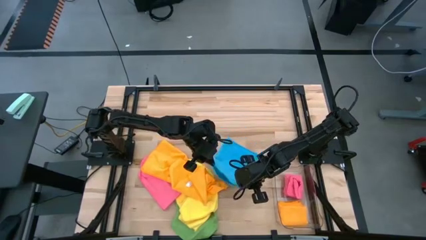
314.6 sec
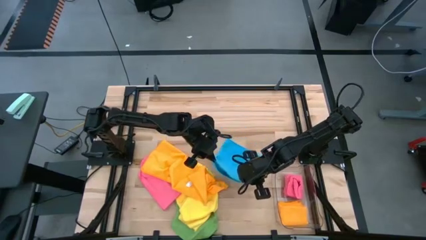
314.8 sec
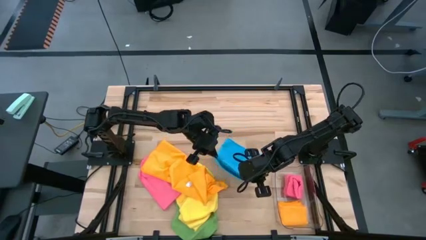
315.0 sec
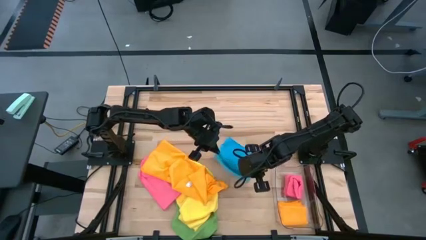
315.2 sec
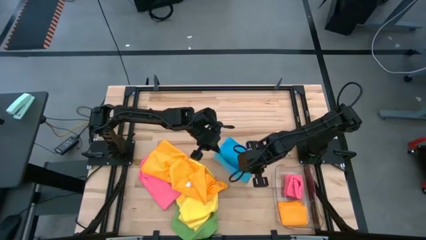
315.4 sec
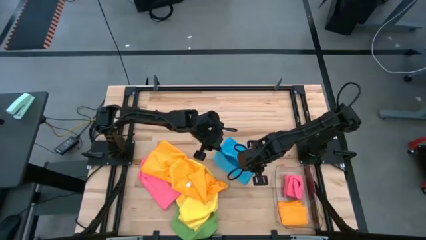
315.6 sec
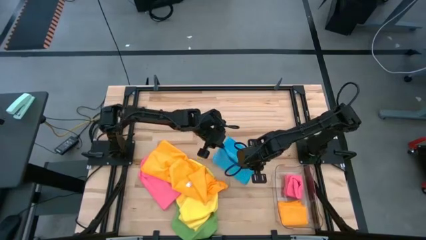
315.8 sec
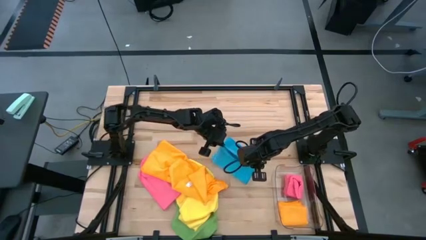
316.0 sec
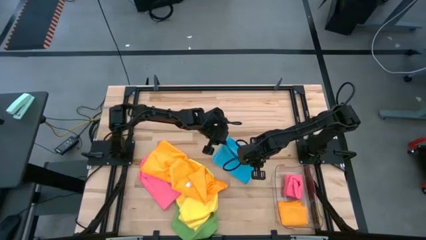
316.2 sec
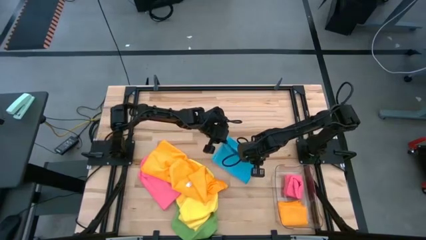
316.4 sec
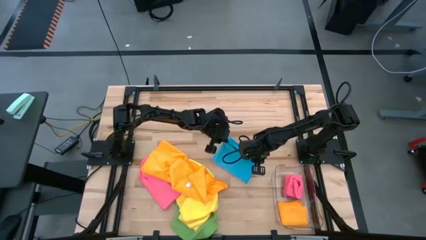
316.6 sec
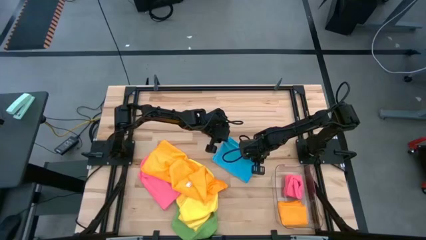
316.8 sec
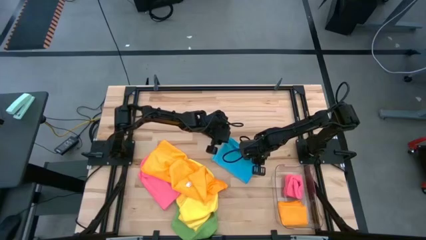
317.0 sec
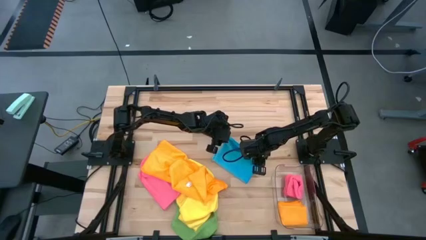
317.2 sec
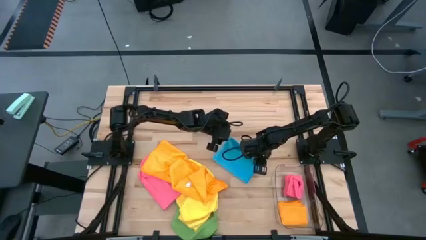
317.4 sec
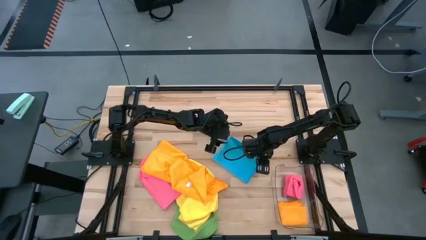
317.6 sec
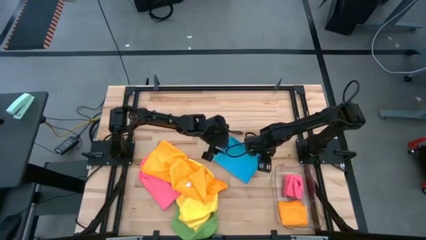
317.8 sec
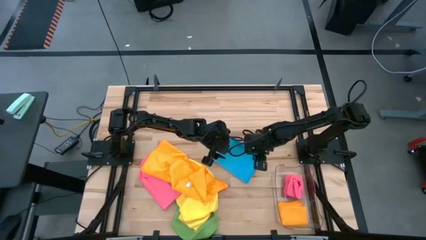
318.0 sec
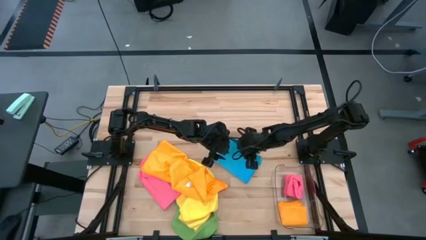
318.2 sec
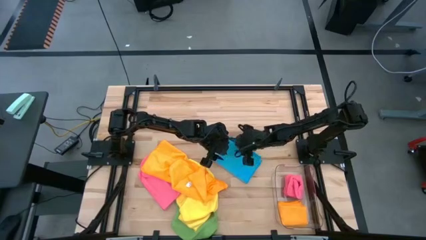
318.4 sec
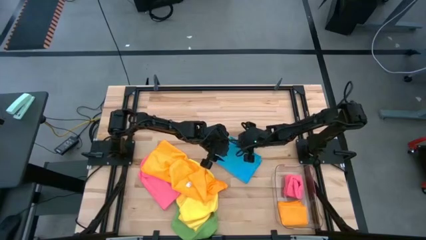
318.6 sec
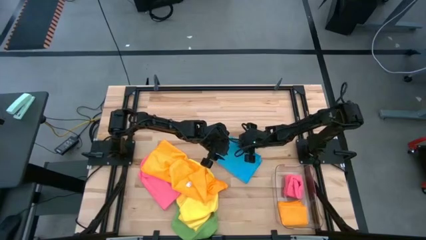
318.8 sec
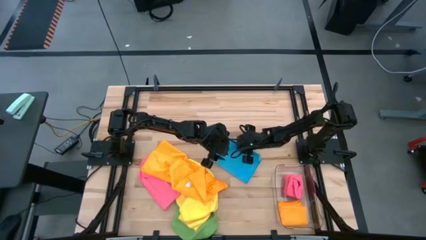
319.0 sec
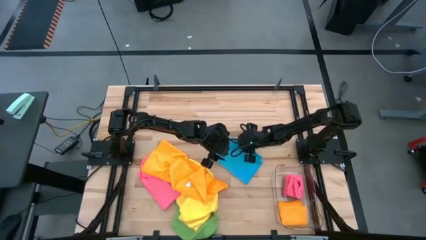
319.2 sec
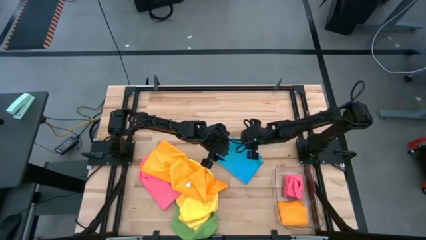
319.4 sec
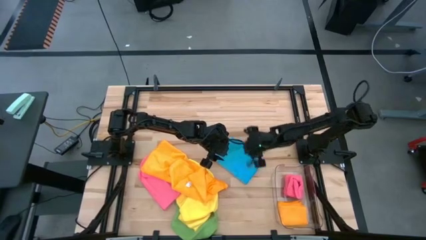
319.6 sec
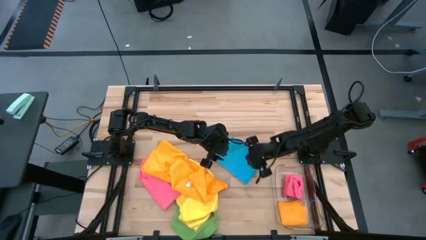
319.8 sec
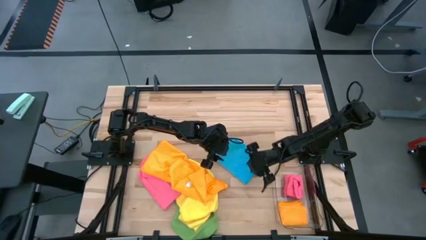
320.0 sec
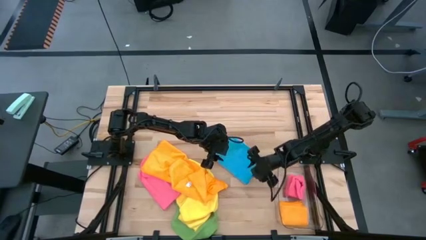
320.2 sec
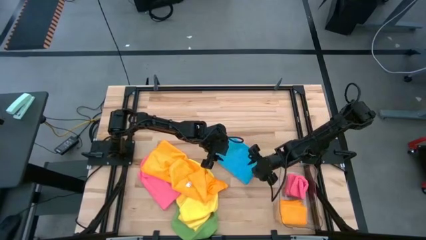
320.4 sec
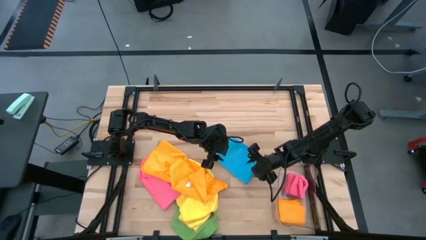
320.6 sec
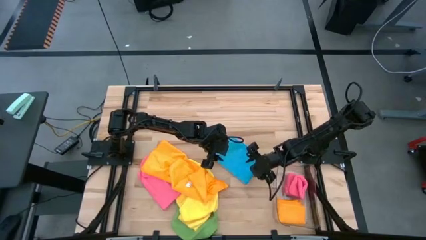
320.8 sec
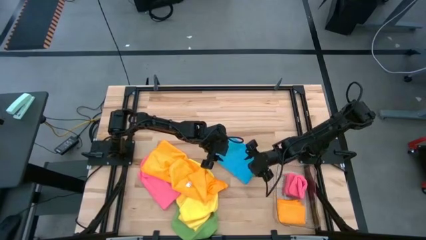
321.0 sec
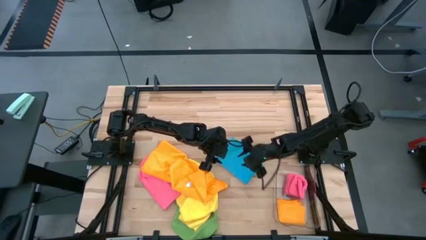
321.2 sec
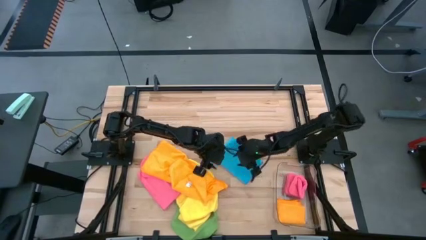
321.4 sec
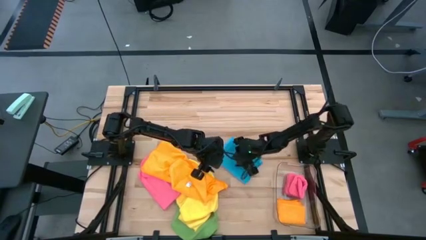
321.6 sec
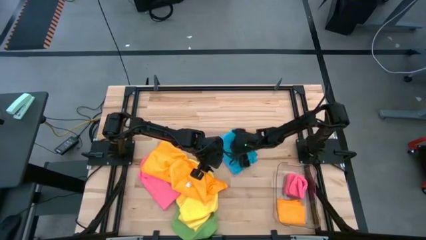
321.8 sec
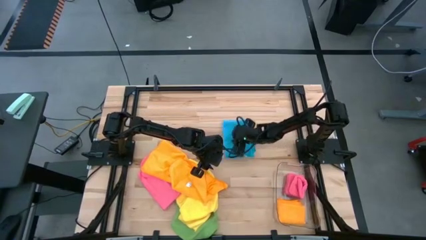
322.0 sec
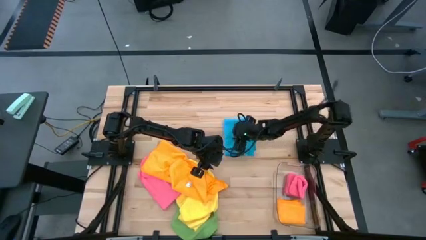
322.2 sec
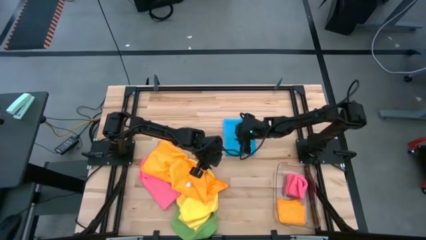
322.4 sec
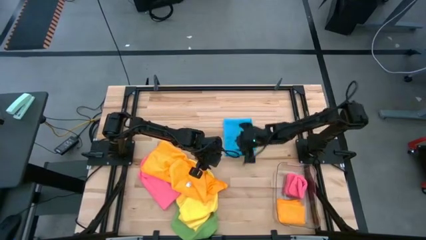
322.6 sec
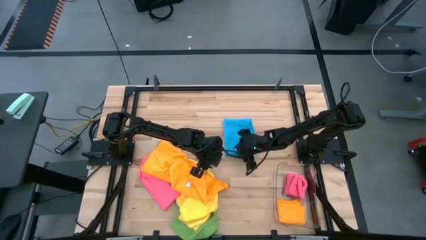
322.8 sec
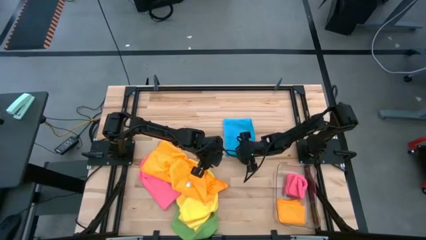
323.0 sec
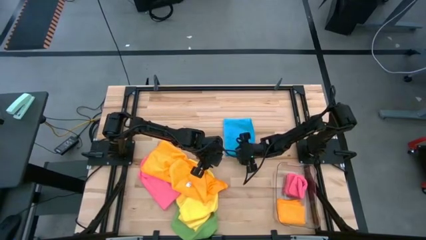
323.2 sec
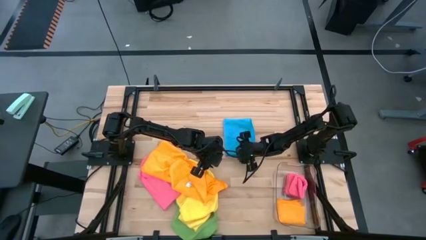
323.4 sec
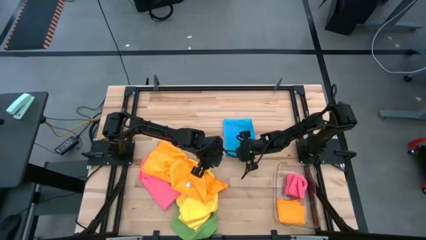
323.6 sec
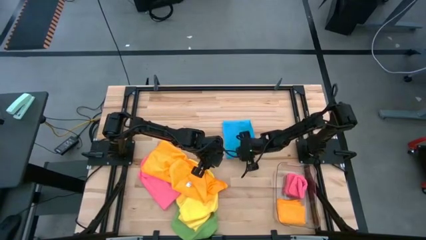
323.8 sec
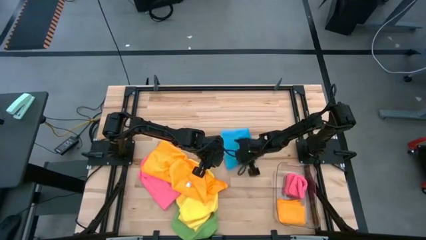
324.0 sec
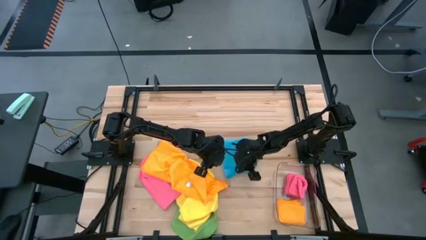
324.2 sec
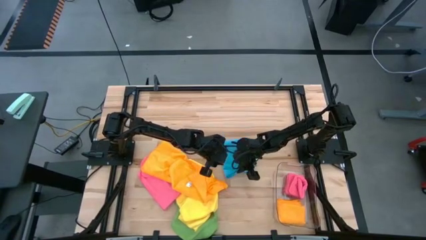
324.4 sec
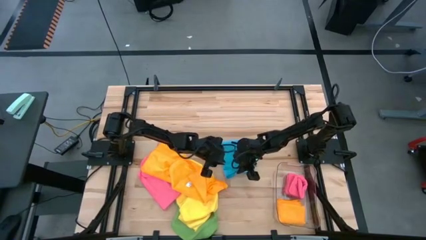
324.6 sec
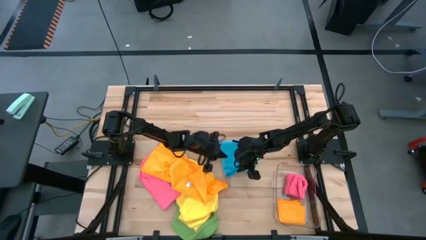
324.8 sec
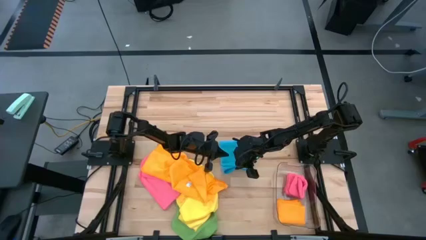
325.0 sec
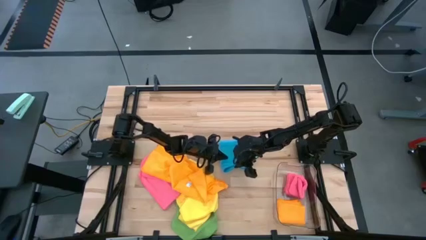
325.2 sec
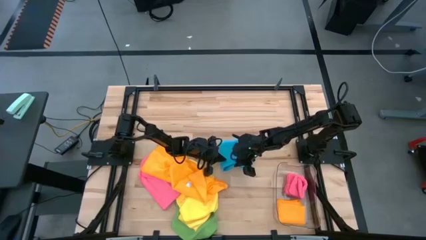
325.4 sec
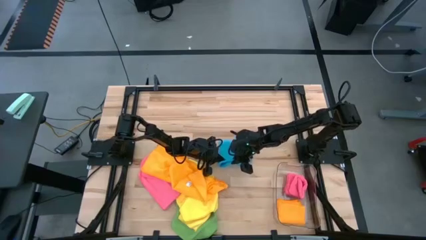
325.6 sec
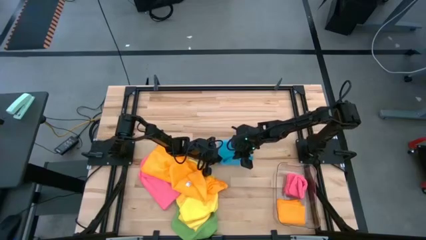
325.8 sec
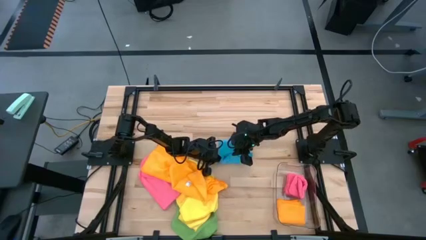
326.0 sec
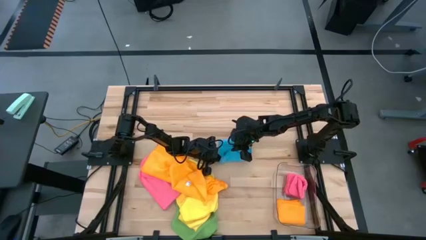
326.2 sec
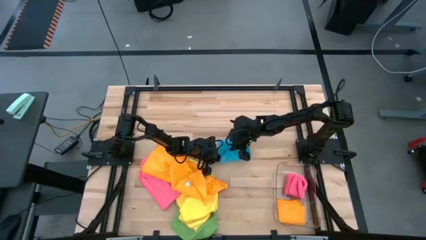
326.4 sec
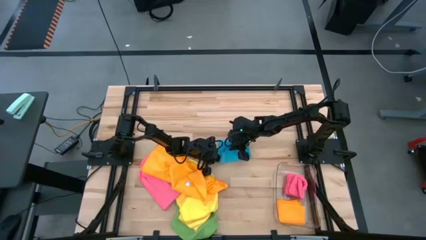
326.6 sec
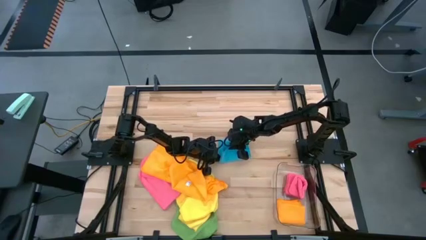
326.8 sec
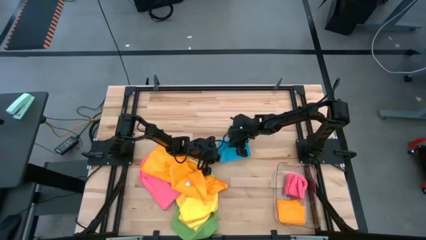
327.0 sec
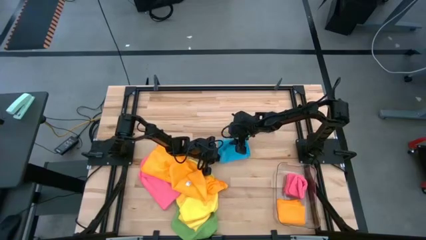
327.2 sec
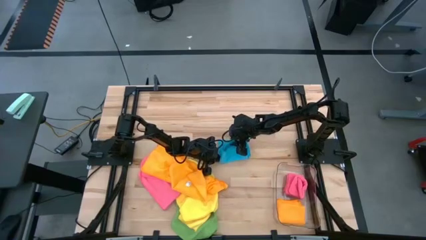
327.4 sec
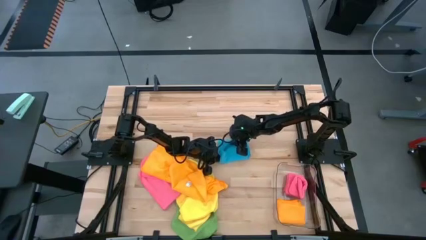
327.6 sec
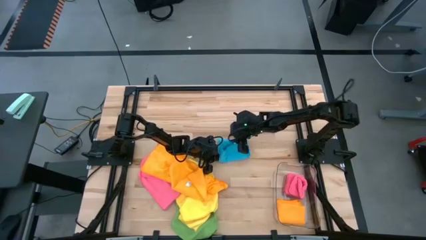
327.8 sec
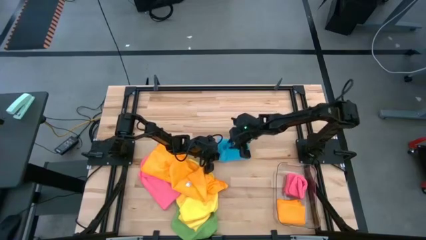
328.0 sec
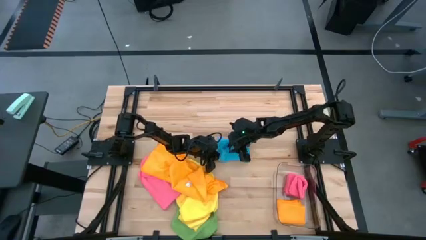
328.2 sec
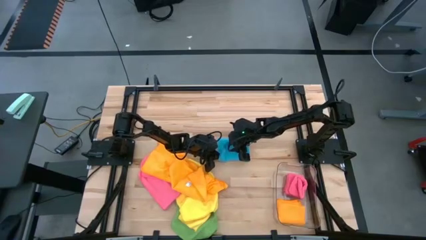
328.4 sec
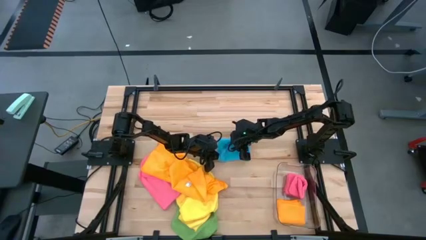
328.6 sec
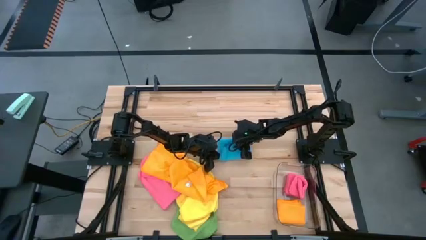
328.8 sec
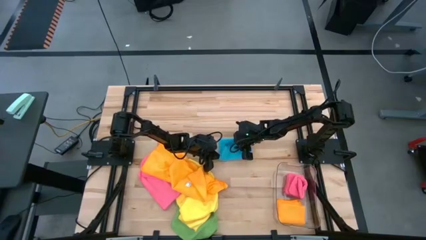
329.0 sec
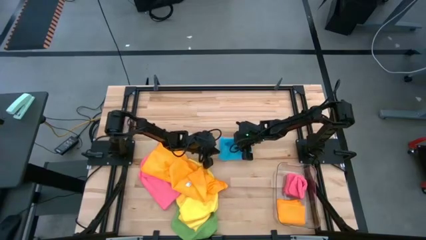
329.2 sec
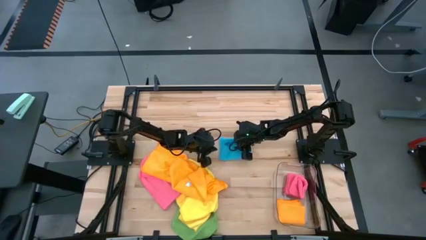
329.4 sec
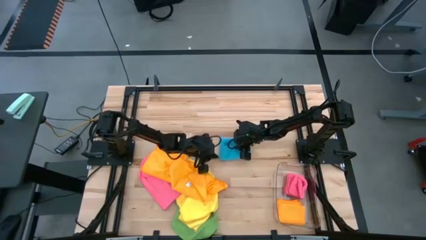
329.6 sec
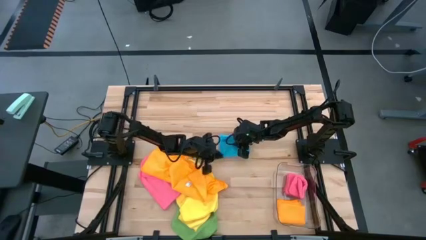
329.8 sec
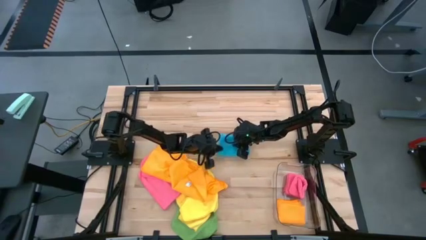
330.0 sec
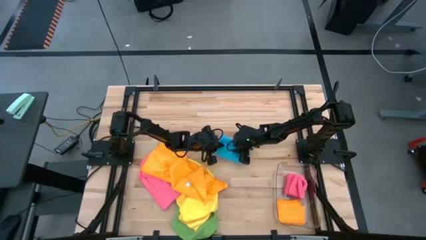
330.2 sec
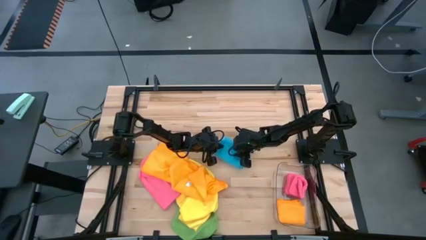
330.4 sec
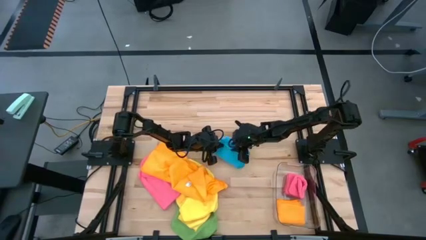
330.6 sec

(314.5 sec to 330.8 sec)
Task: Fold microfiber towels
Fold the blue towel
